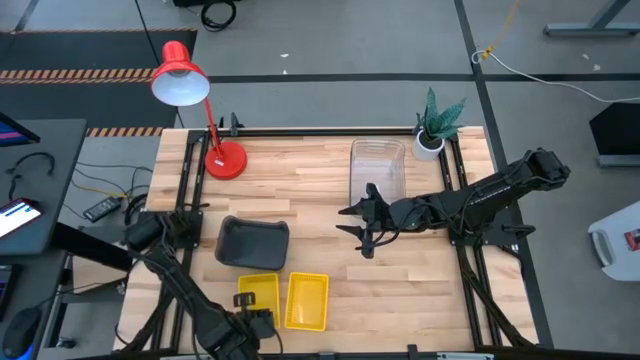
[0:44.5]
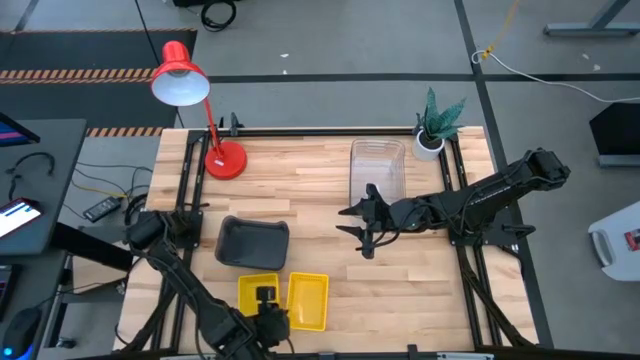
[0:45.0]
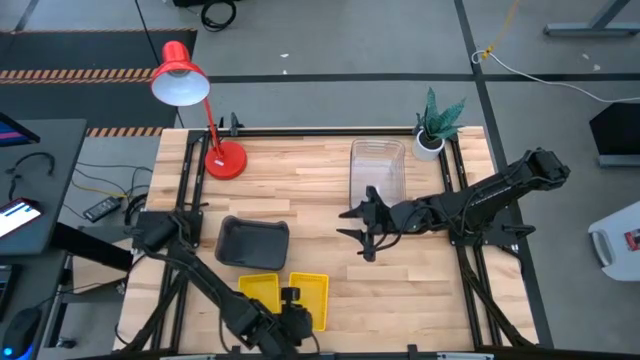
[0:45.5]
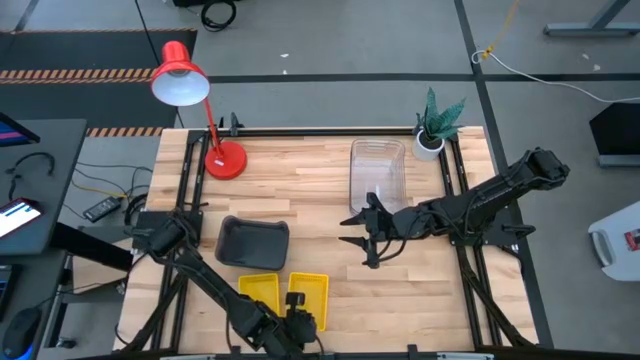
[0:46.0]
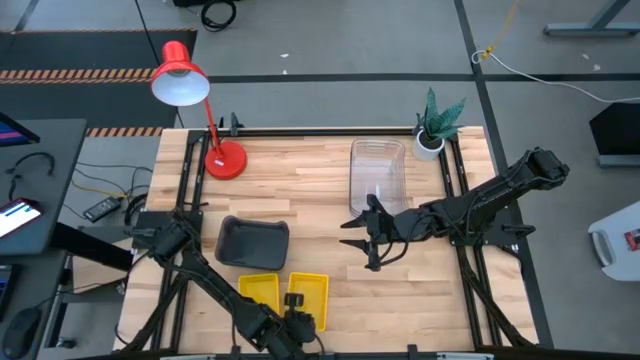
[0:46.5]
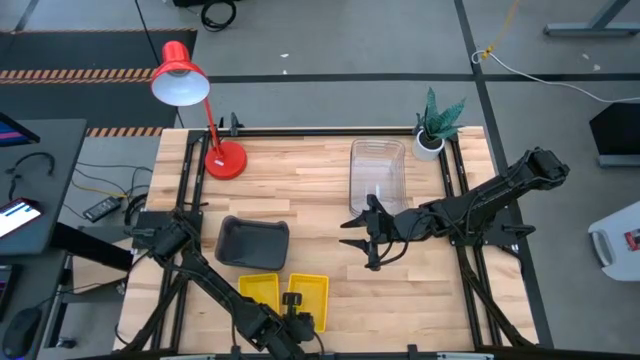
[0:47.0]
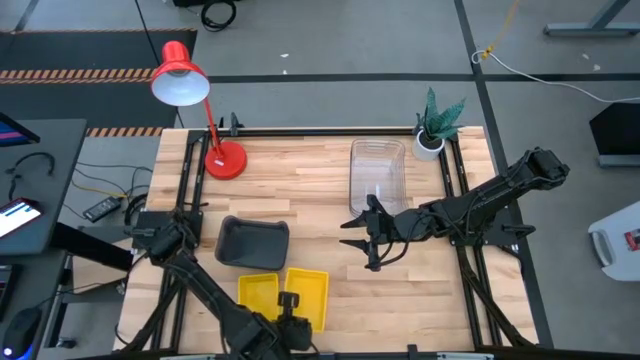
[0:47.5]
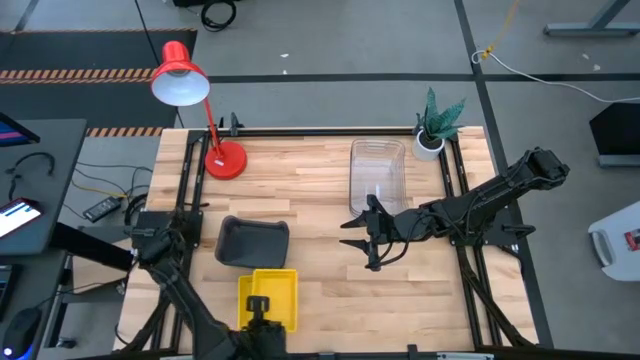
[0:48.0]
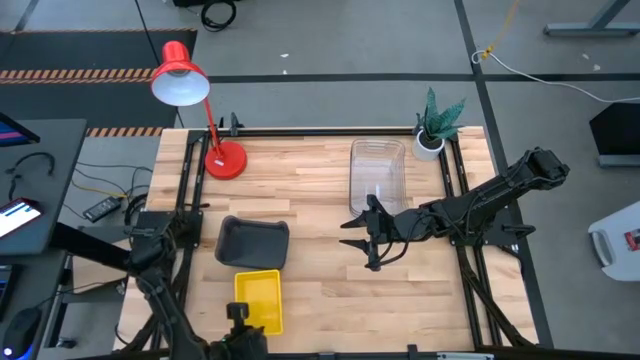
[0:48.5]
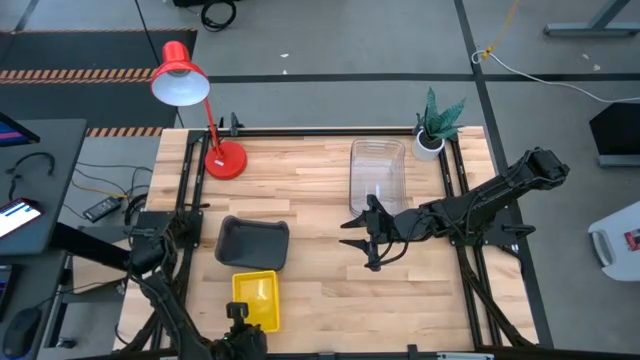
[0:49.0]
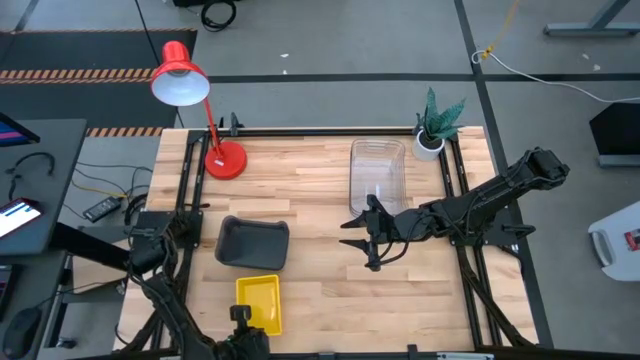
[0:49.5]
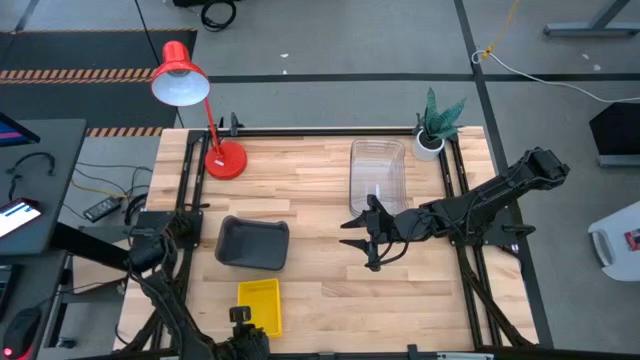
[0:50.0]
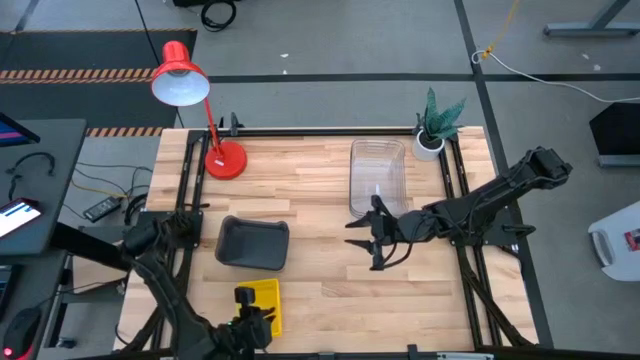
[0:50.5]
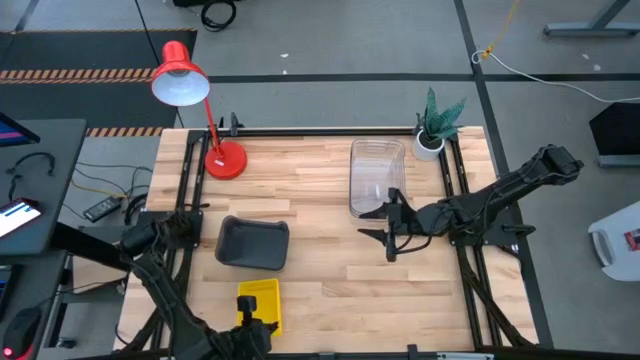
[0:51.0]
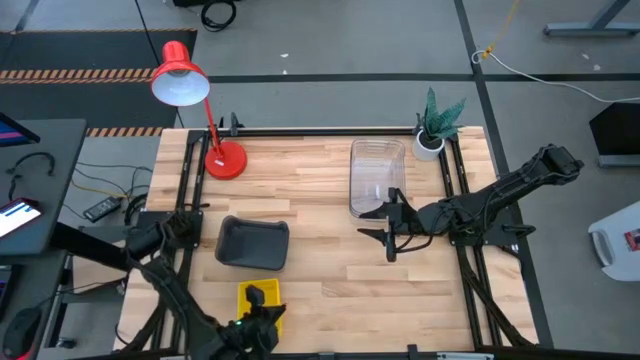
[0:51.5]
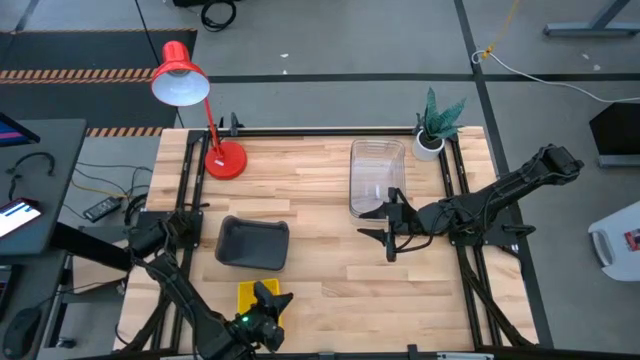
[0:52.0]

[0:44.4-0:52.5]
Stack the right yellow bin on the left yellow bin

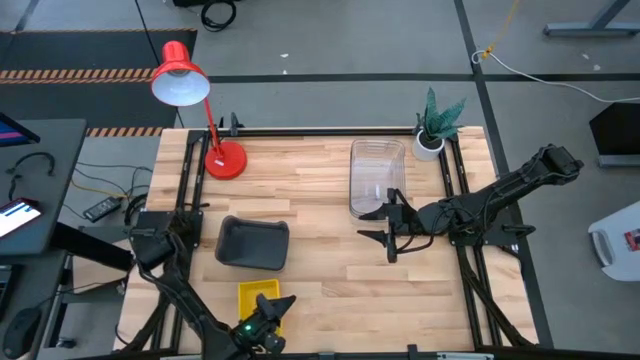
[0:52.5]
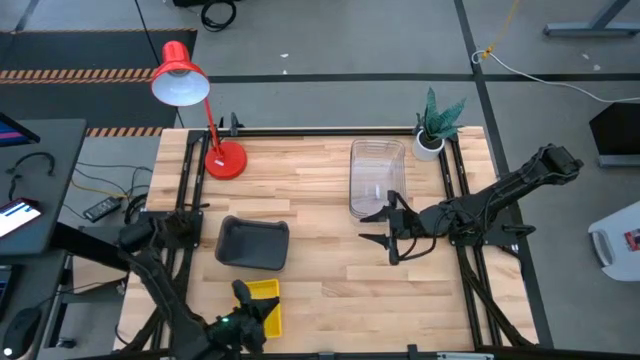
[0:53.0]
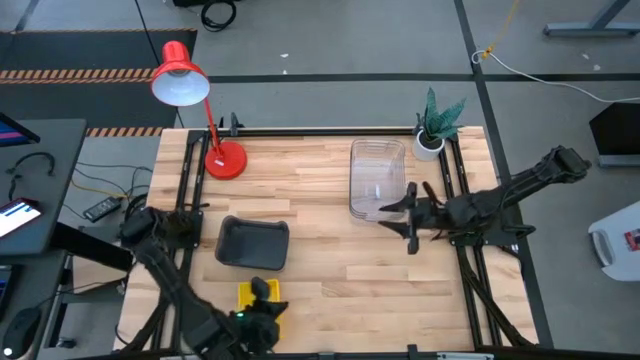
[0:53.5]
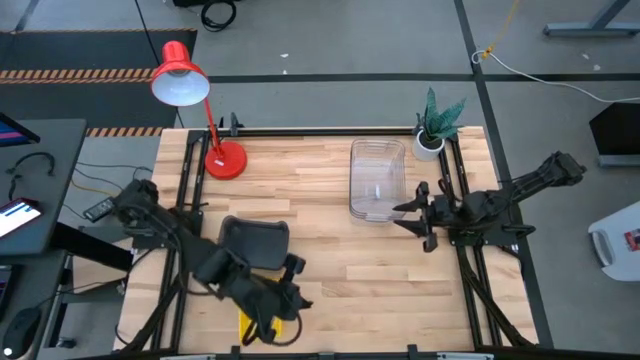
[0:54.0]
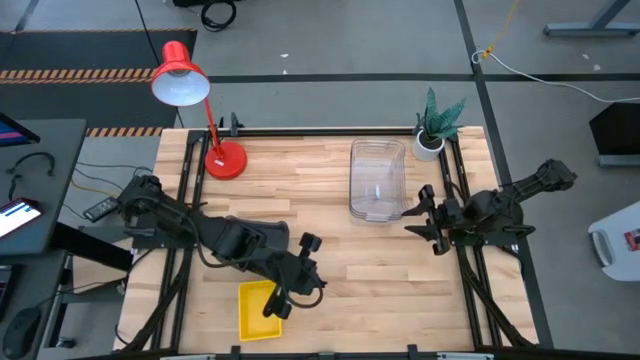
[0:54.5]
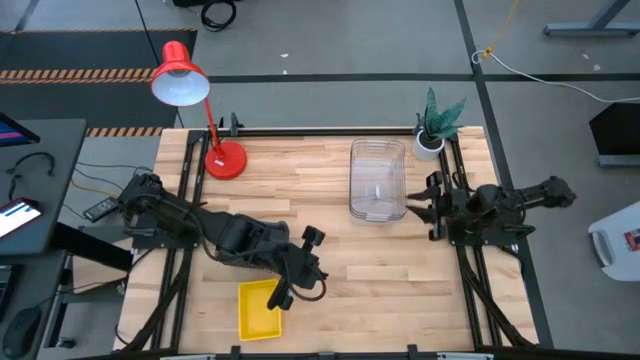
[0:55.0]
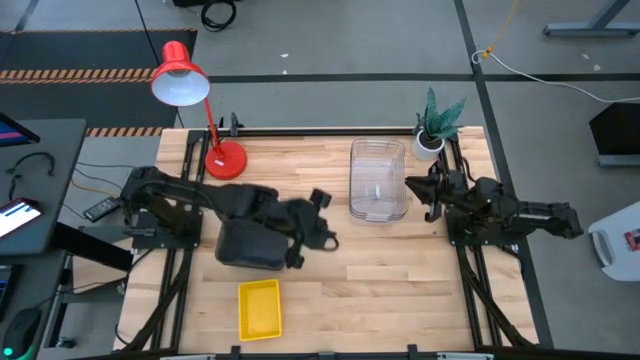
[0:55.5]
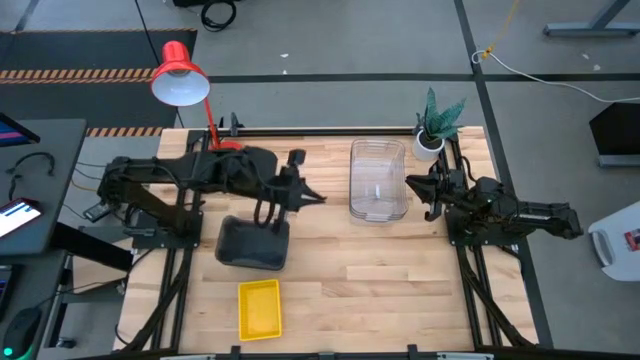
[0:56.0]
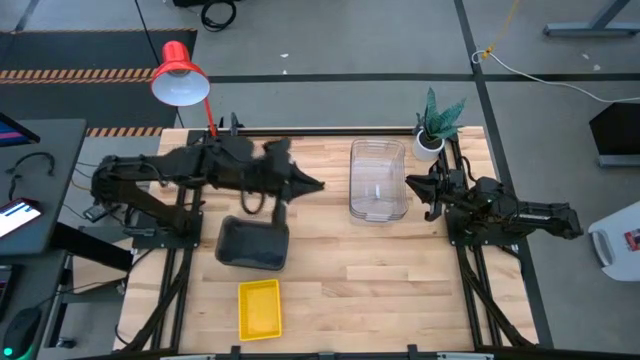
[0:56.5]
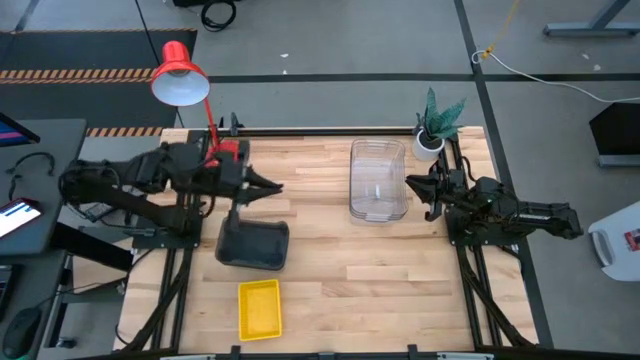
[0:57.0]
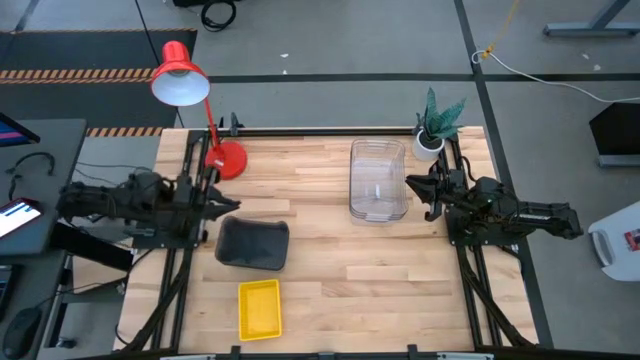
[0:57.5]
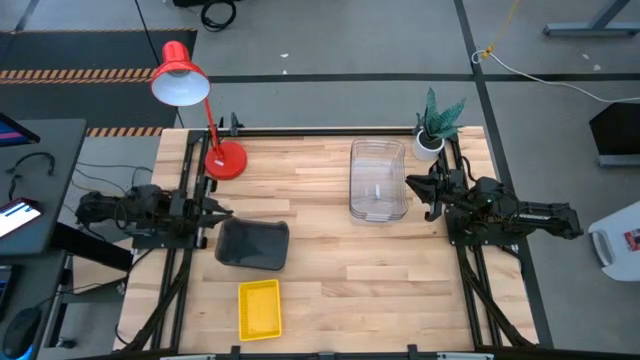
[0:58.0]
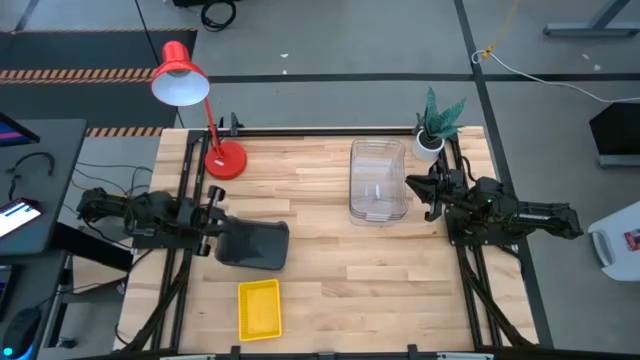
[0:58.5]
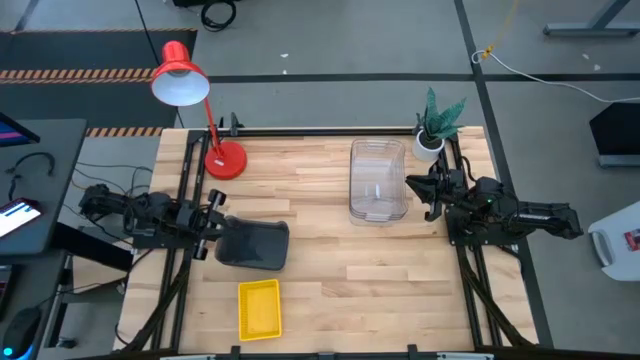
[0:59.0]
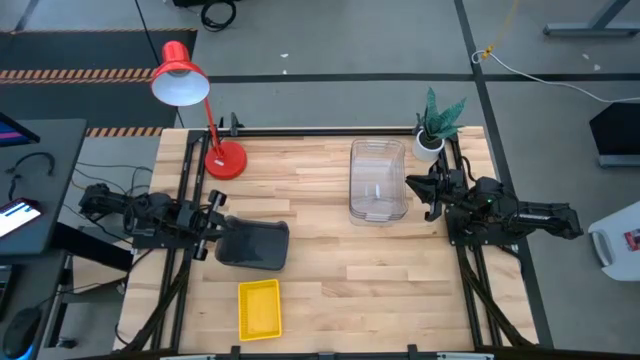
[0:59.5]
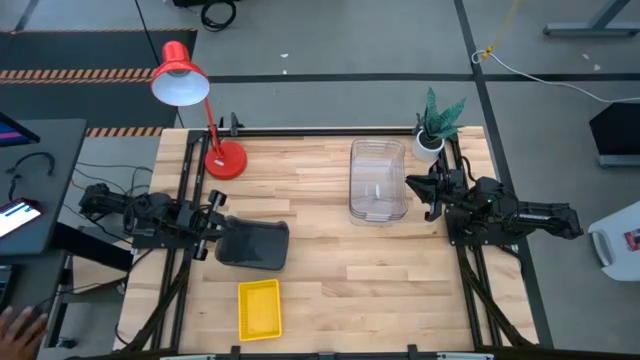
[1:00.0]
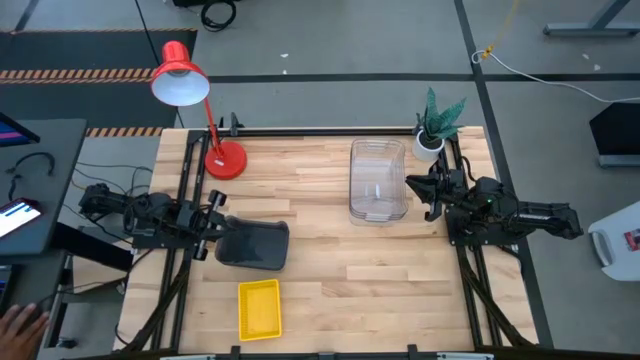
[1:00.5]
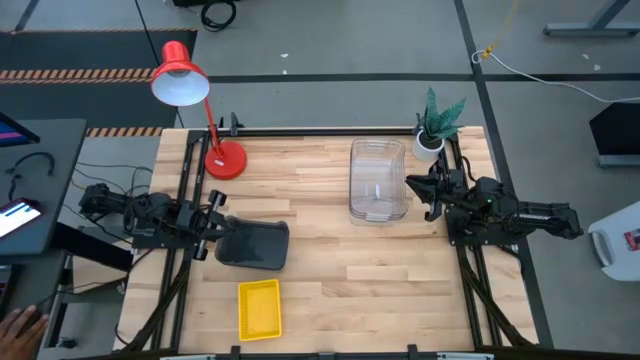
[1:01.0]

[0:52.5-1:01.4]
Return to Home Position
